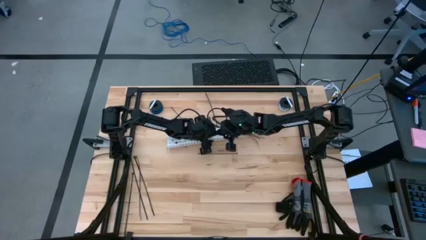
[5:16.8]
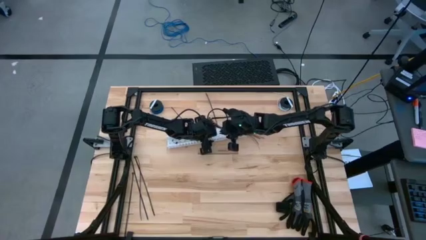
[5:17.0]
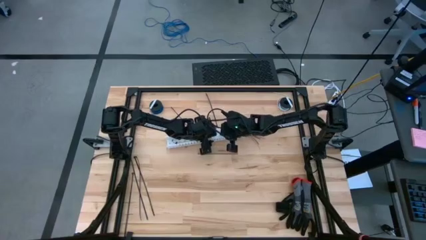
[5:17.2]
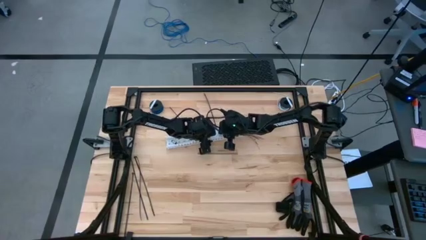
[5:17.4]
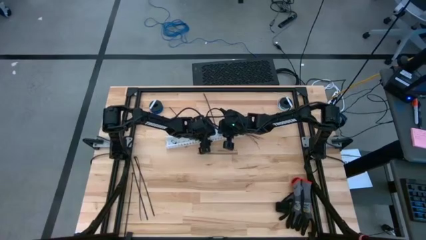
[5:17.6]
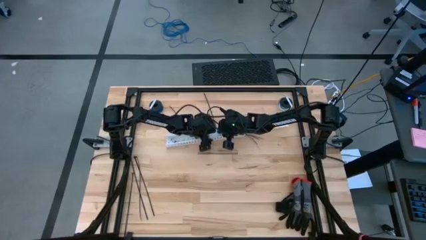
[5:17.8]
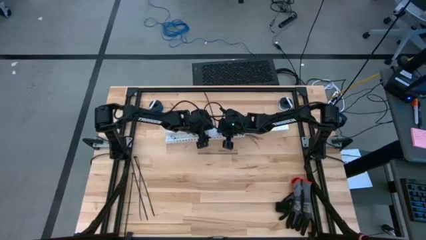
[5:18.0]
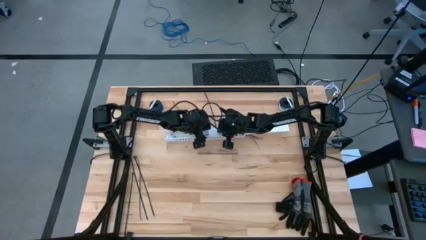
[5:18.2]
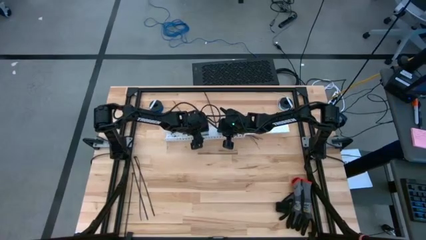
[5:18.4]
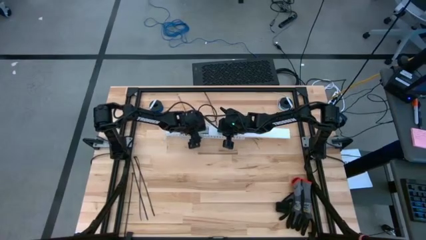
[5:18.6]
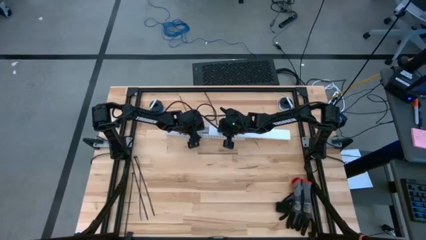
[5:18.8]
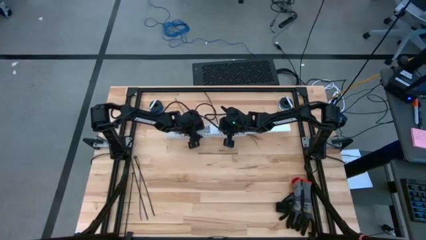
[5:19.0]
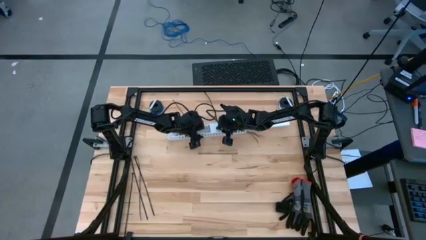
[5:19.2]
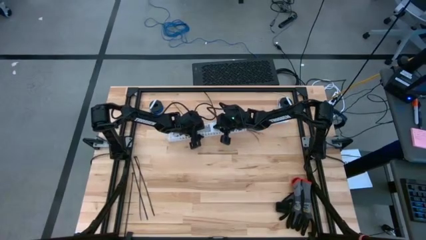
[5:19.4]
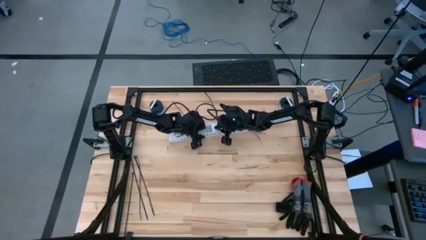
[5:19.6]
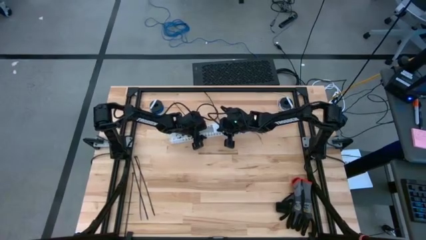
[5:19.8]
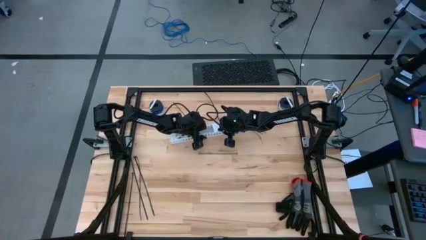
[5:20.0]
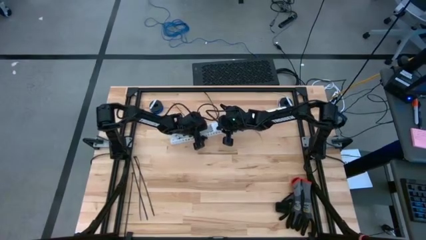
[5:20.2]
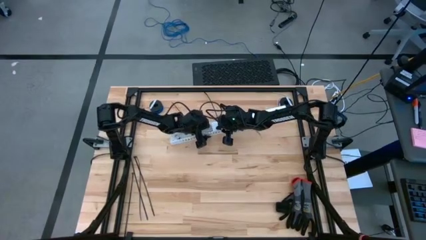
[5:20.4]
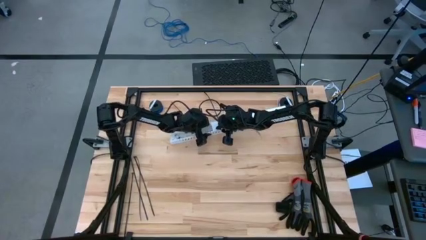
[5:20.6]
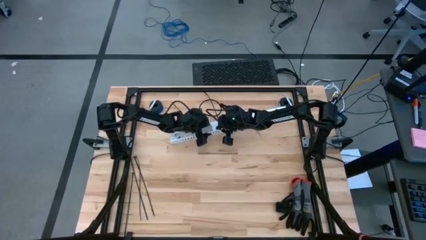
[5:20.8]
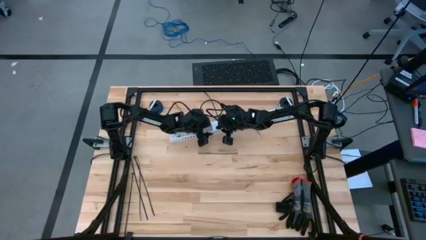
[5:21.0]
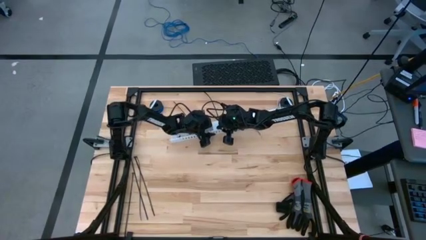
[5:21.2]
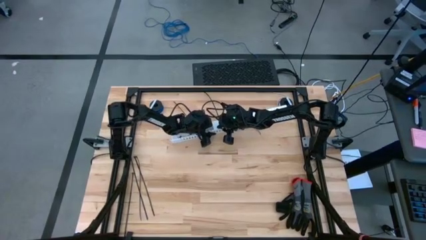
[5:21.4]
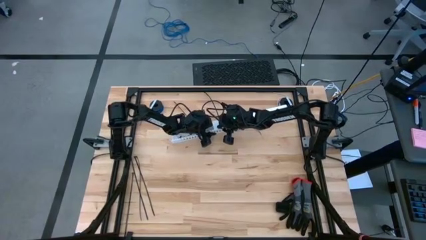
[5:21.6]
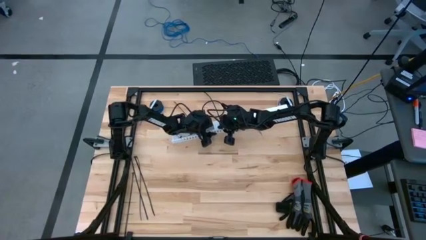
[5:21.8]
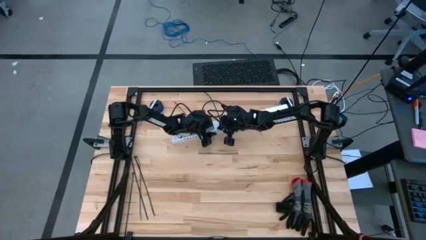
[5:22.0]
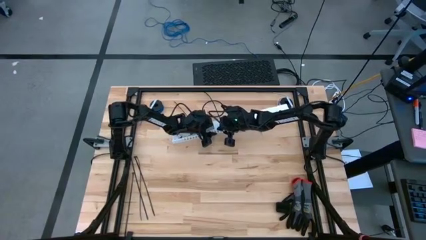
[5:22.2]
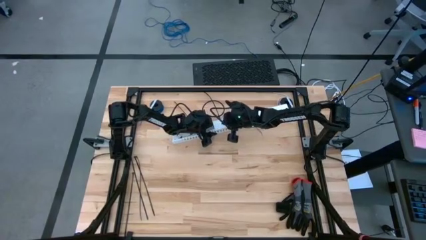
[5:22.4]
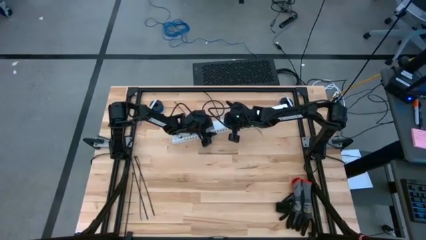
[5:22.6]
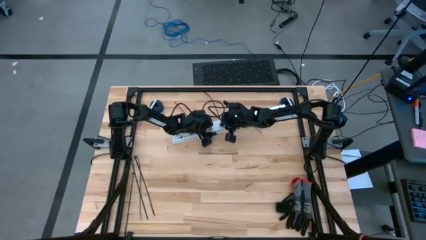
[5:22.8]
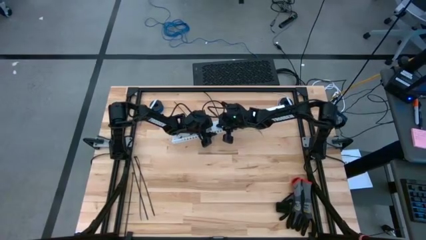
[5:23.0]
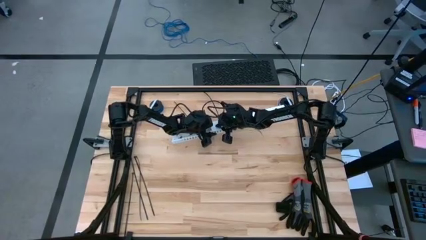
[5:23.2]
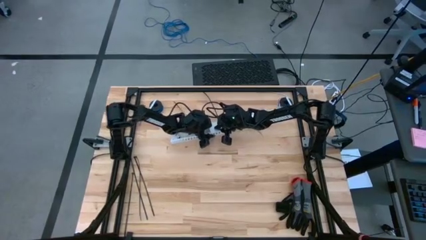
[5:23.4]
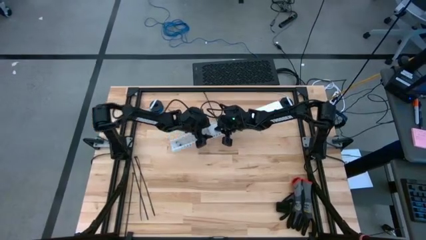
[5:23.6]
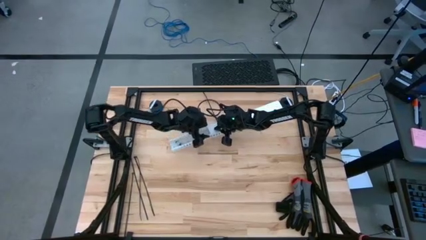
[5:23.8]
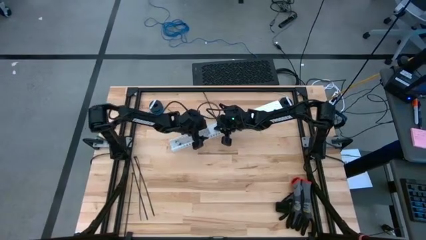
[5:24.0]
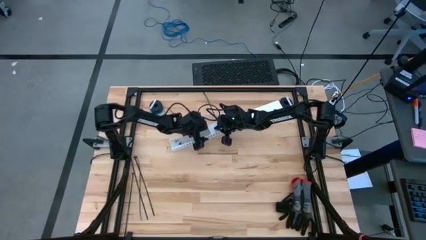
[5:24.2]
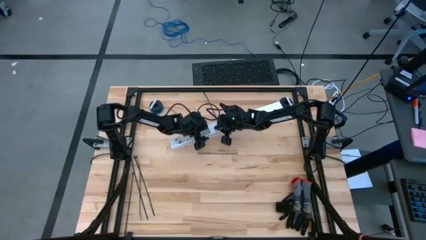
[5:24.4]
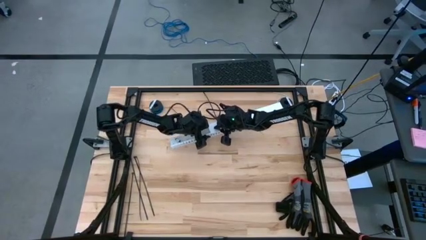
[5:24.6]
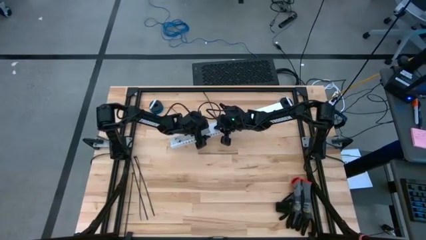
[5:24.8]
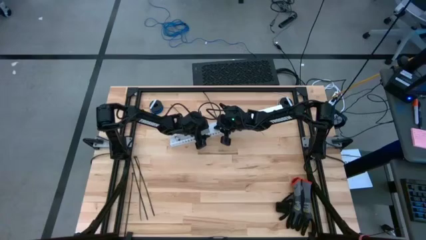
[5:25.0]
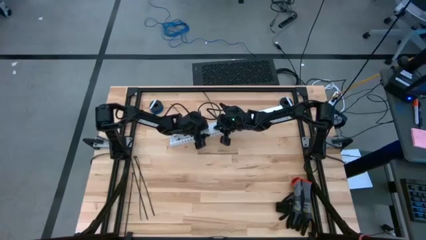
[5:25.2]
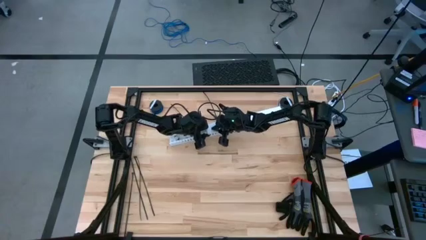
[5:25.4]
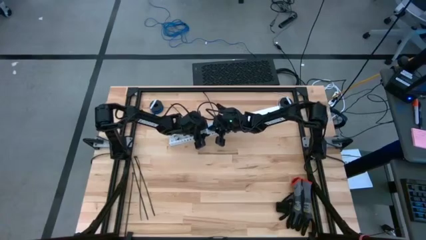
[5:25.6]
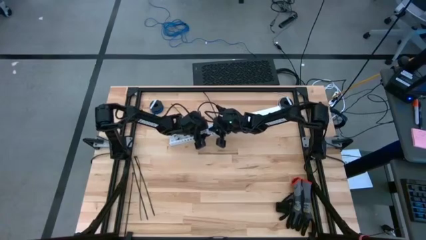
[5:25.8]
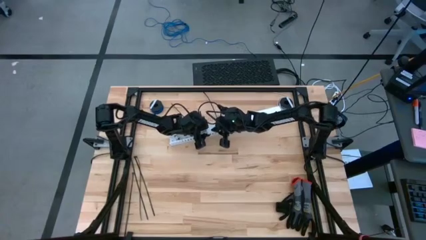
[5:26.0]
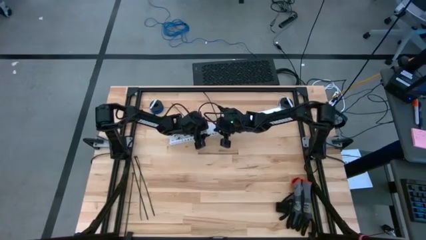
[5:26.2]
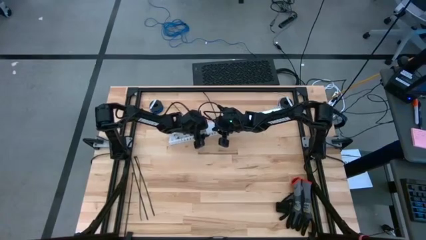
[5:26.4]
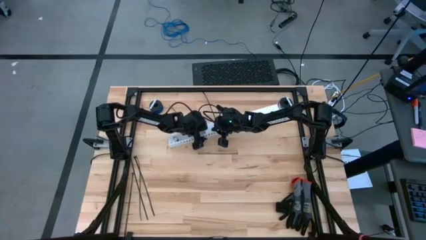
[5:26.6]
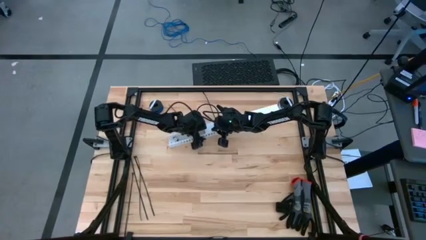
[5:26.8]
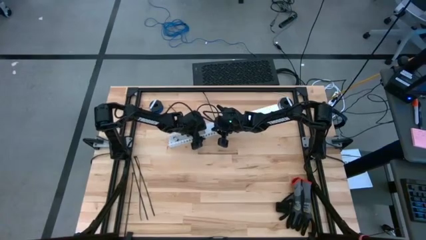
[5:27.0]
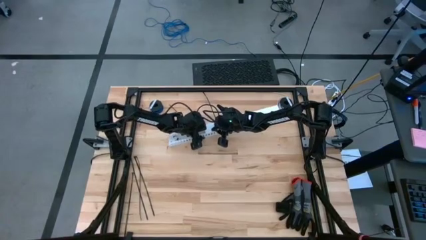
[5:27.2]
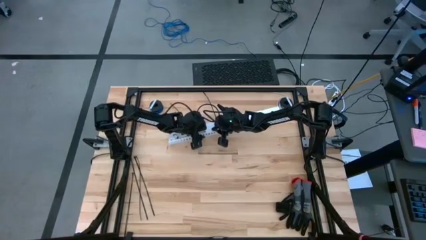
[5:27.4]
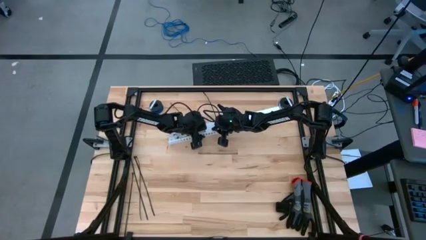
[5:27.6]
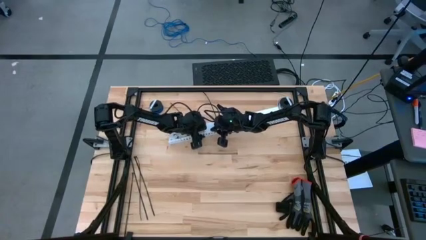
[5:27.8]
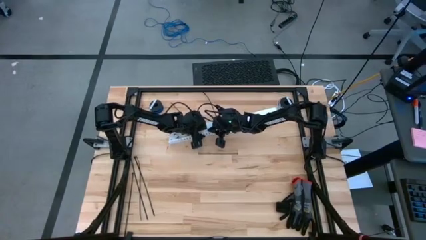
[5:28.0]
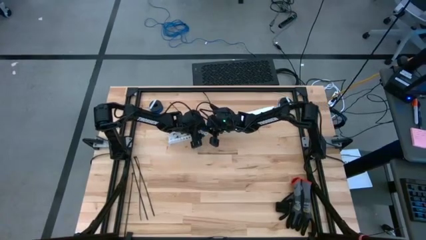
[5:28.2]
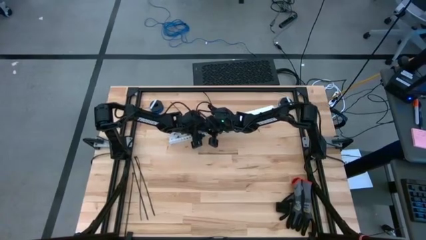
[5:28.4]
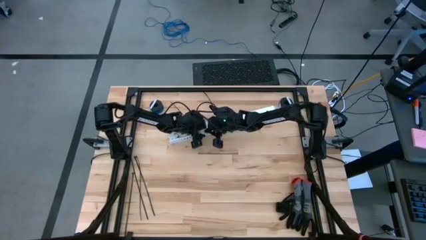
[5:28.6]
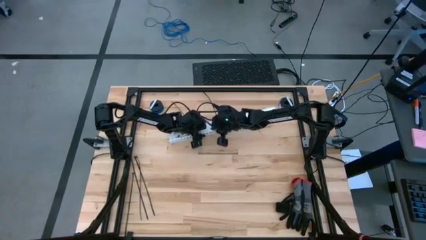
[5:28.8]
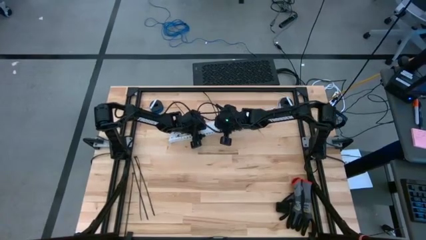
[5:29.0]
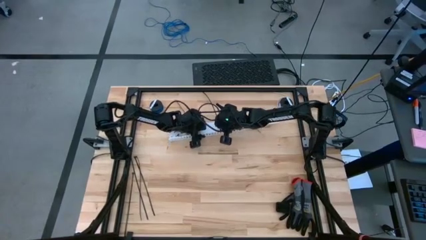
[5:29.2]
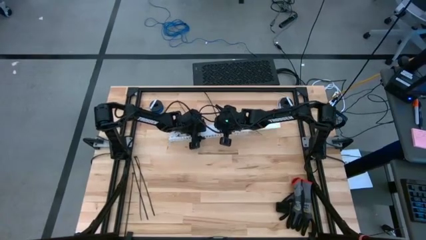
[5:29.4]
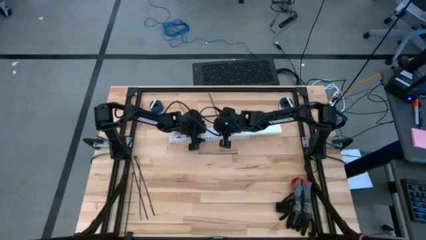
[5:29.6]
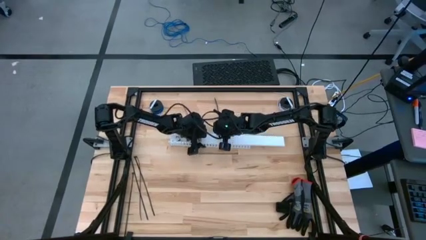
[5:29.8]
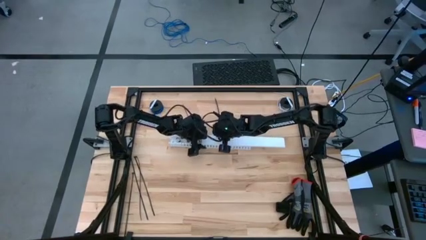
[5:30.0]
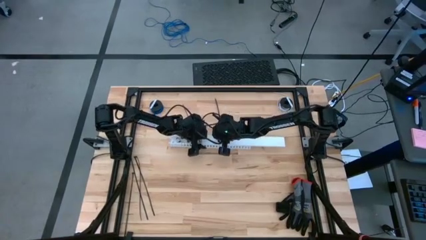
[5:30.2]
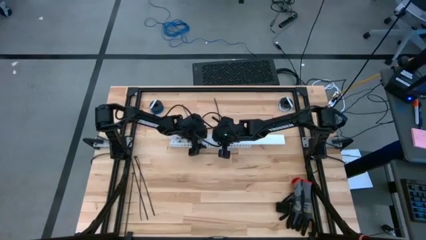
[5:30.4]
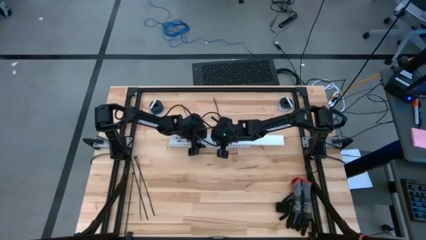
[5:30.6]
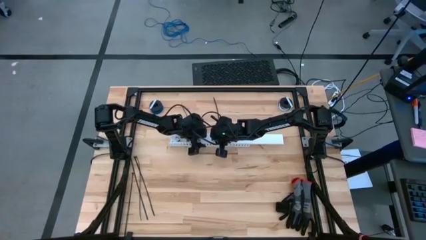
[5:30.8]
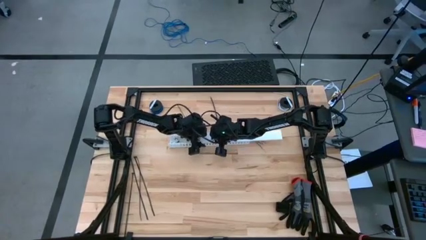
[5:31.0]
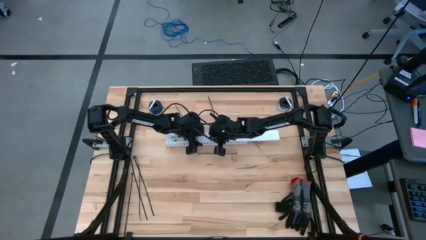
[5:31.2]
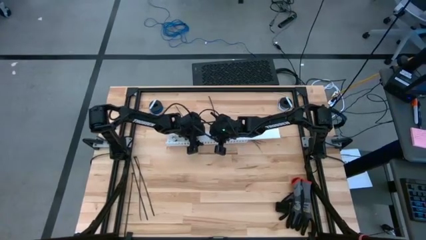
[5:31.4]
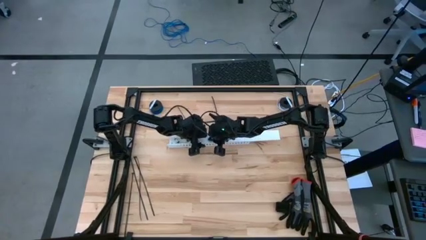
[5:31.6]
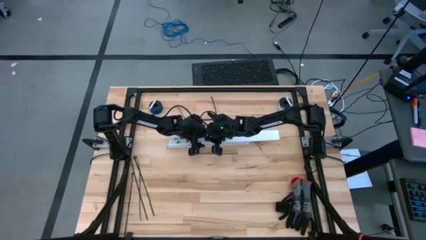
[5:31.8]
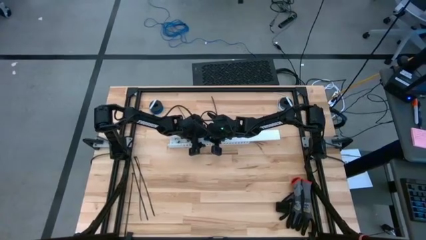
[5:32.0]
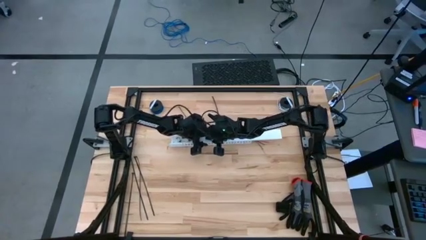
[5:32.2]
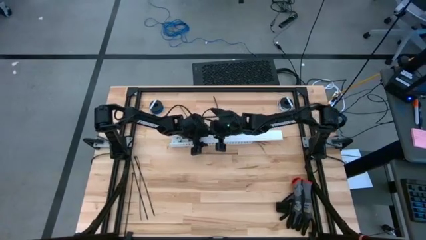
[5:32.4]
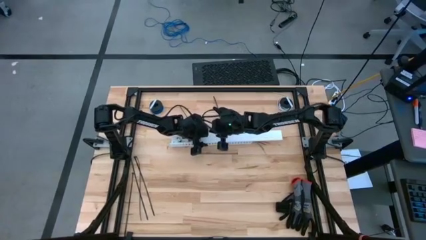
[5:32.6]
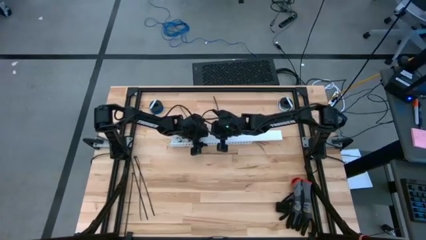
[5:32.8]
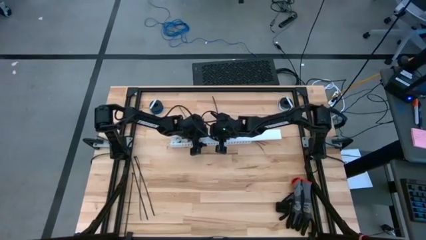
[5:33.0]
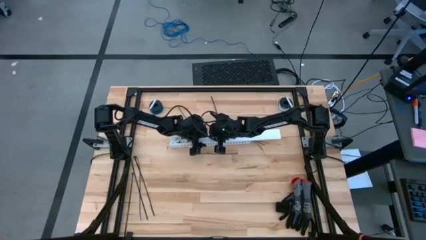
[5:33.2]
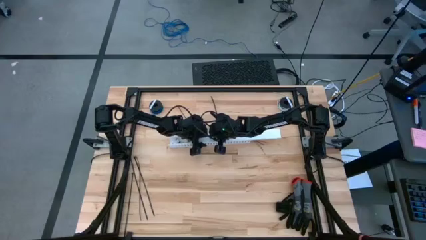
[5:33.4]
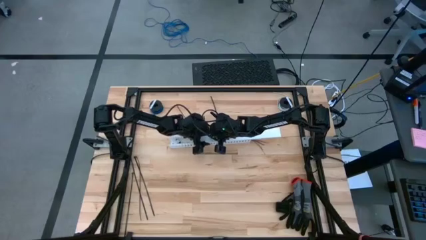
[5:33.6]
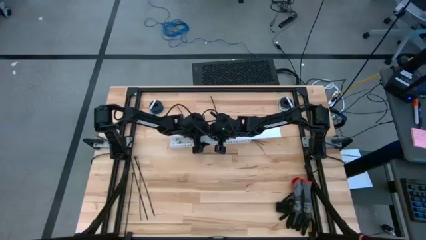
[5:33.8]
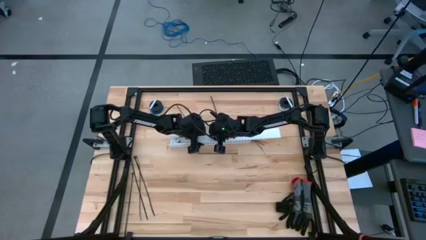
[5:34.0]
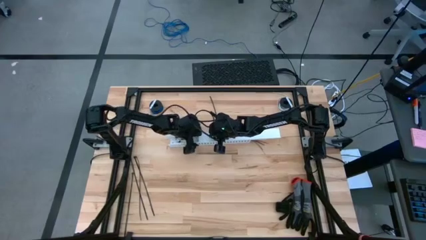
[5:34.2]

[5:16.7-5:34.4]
Task: Ziptie cables
Close the white cable duct
